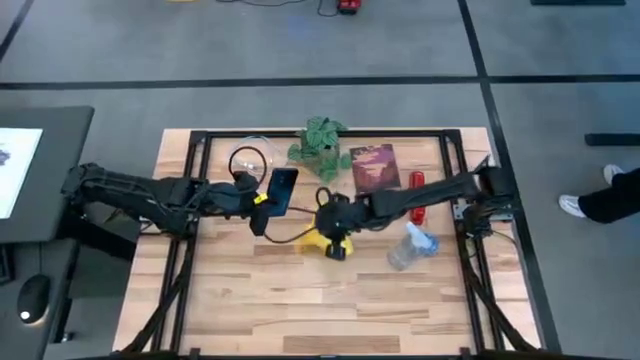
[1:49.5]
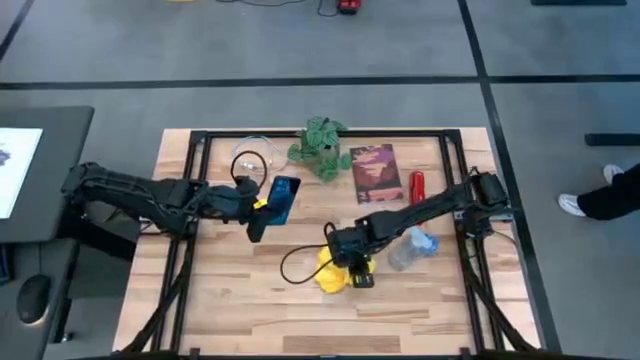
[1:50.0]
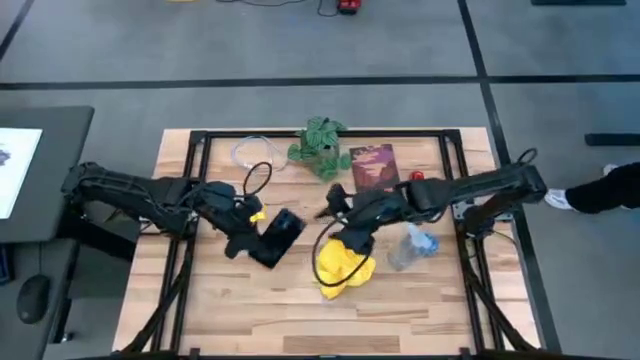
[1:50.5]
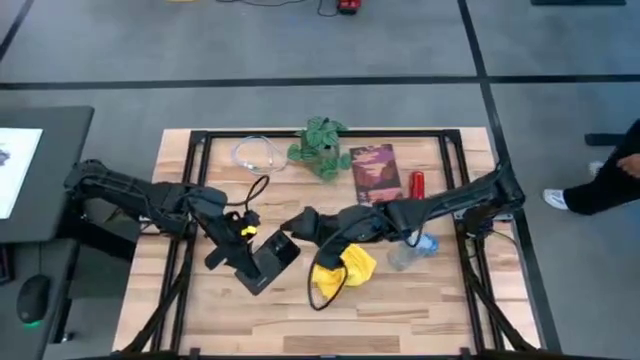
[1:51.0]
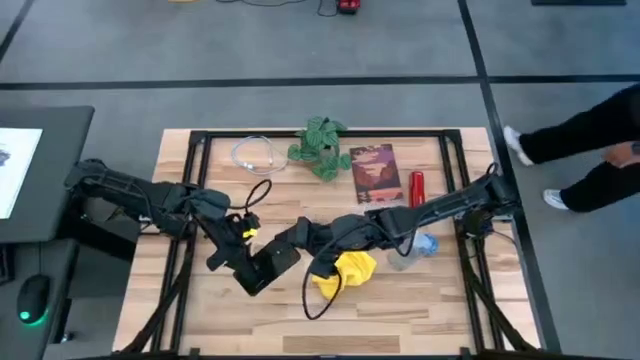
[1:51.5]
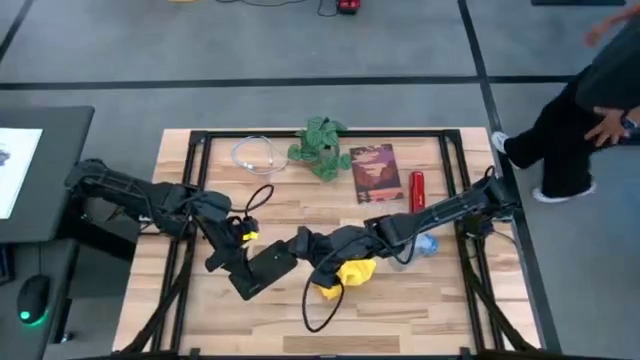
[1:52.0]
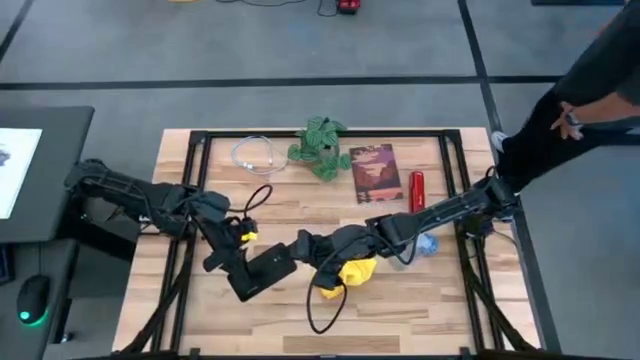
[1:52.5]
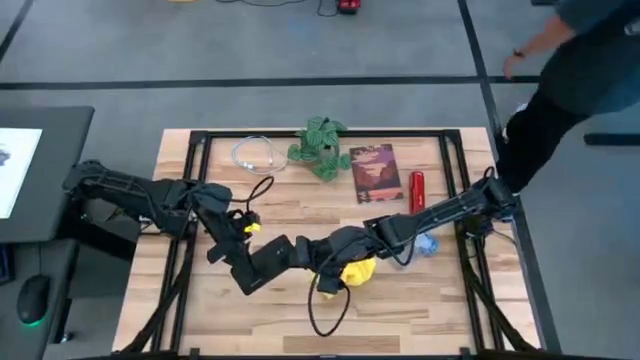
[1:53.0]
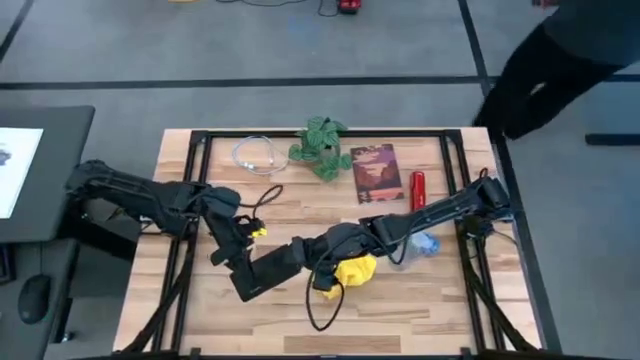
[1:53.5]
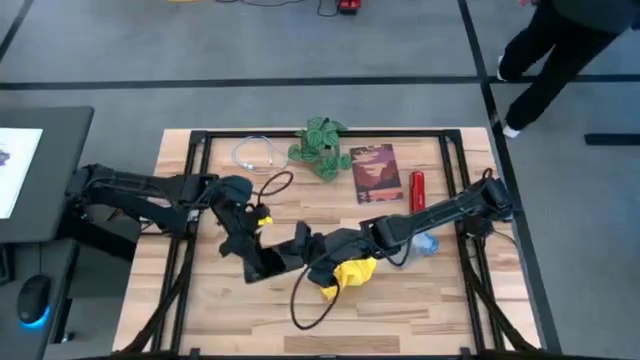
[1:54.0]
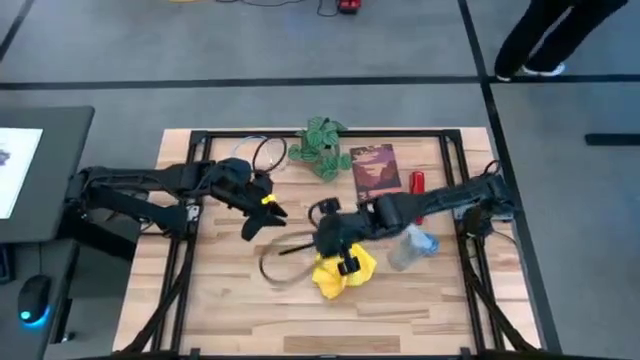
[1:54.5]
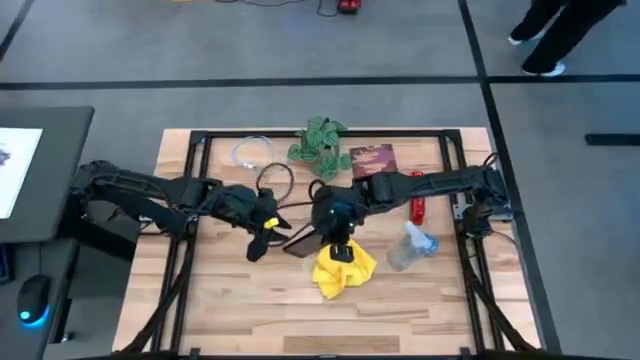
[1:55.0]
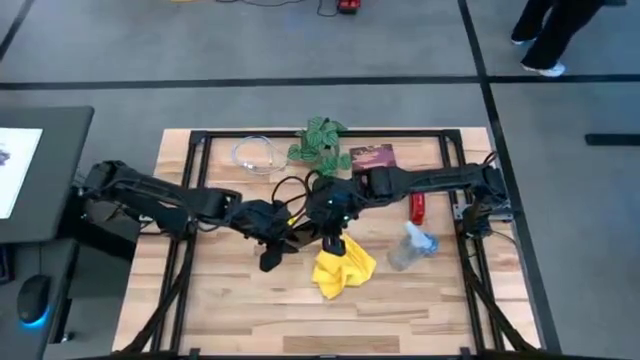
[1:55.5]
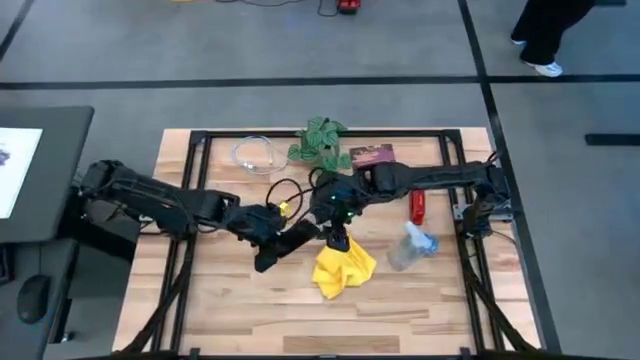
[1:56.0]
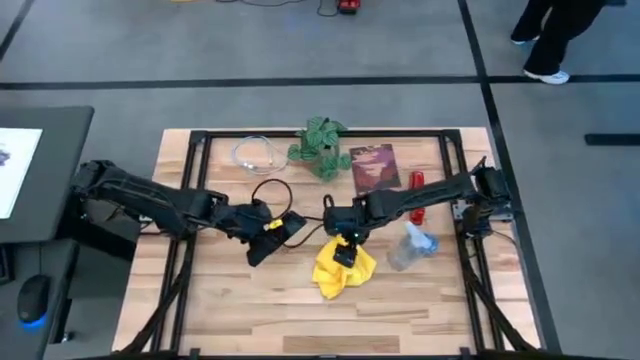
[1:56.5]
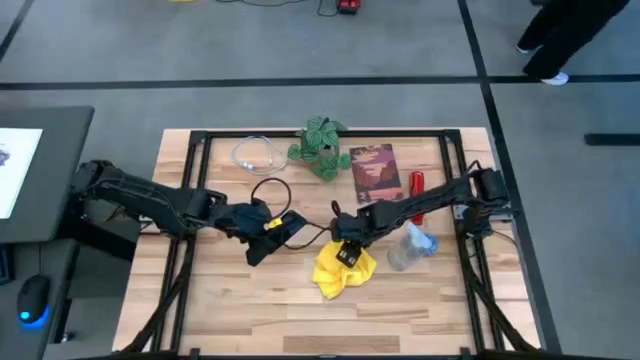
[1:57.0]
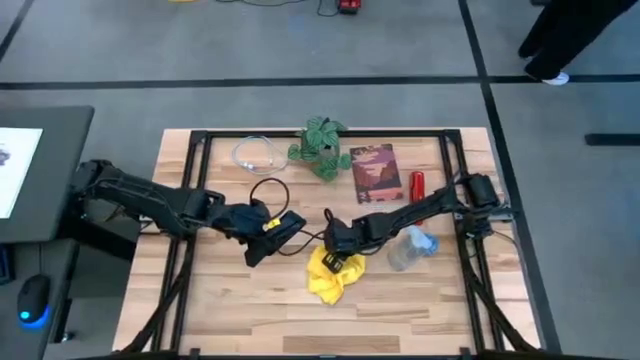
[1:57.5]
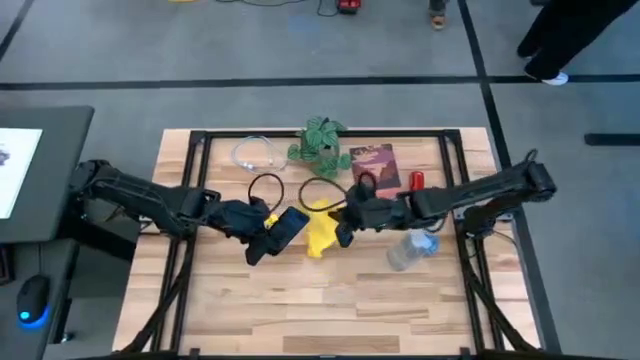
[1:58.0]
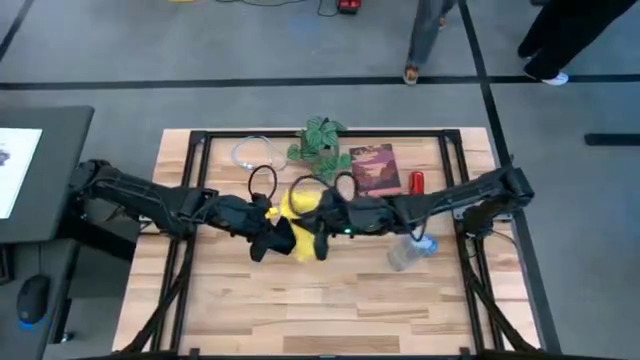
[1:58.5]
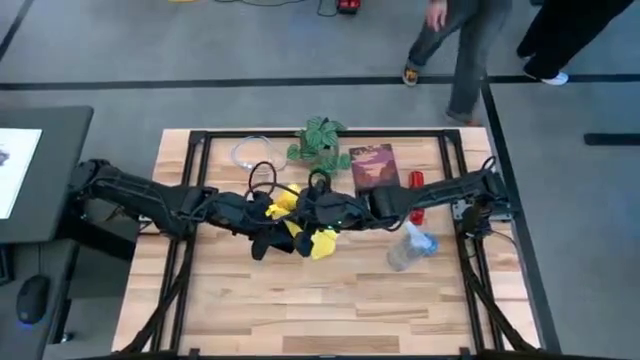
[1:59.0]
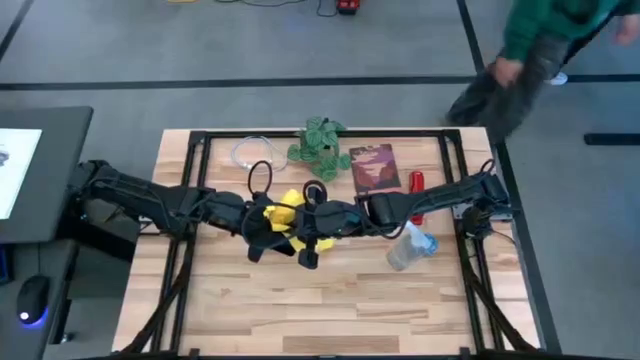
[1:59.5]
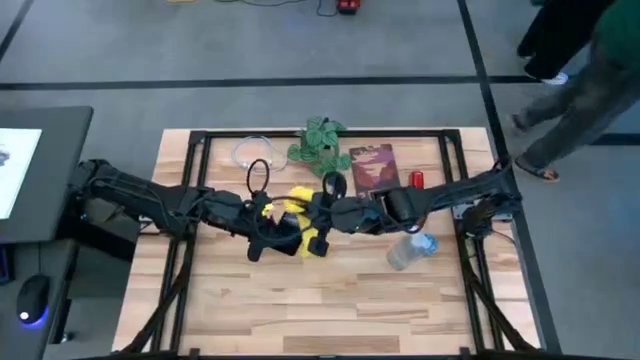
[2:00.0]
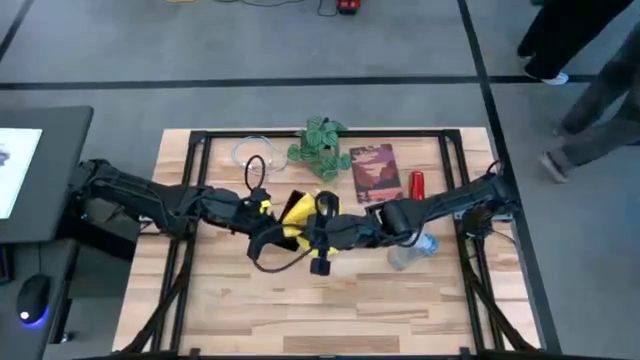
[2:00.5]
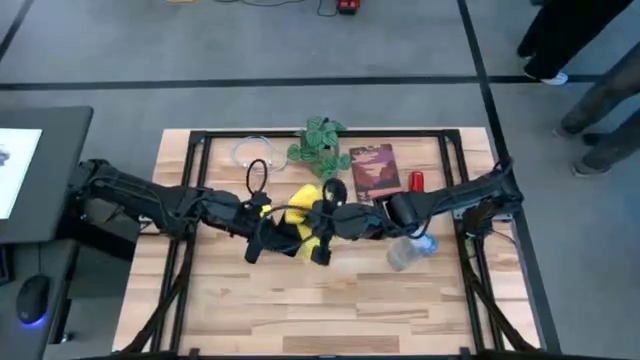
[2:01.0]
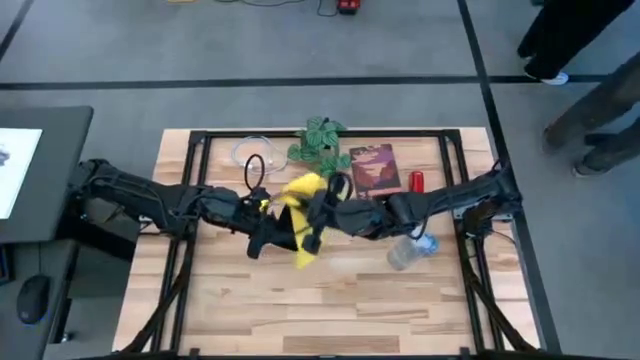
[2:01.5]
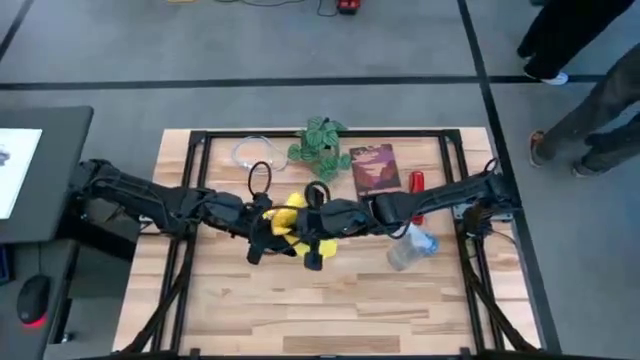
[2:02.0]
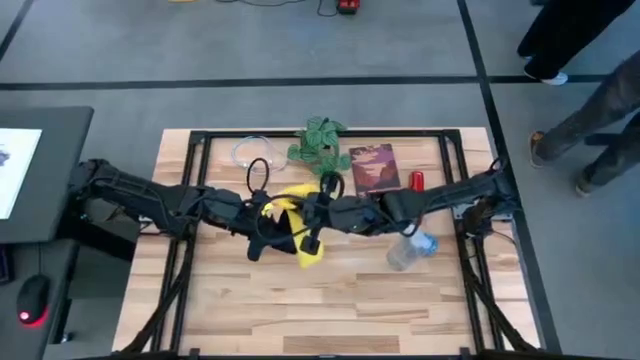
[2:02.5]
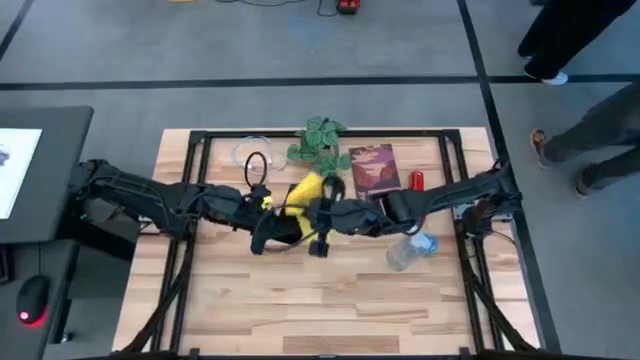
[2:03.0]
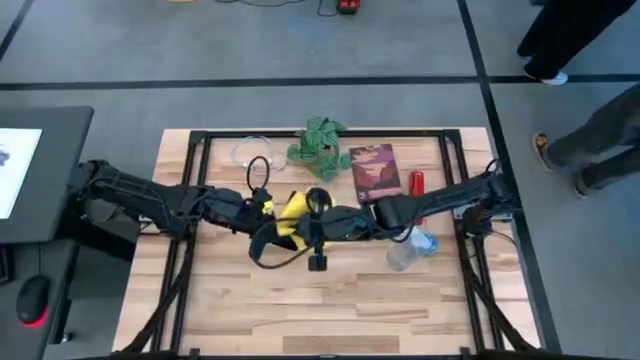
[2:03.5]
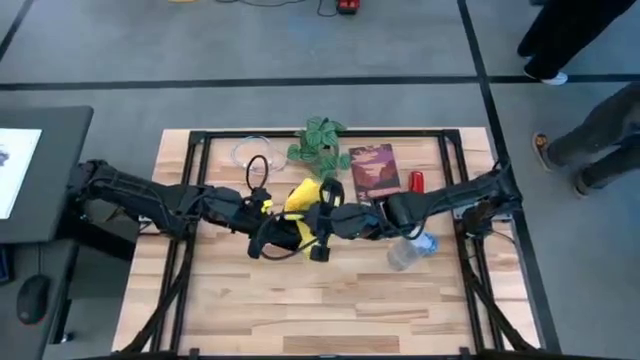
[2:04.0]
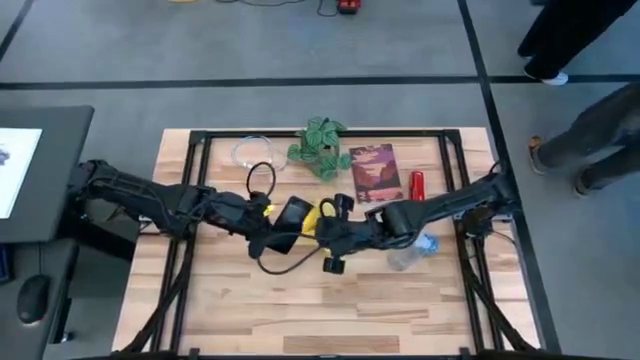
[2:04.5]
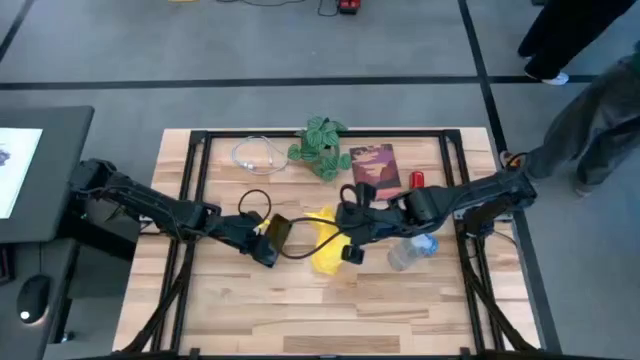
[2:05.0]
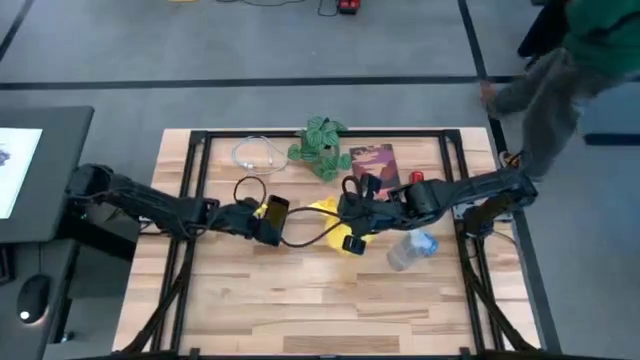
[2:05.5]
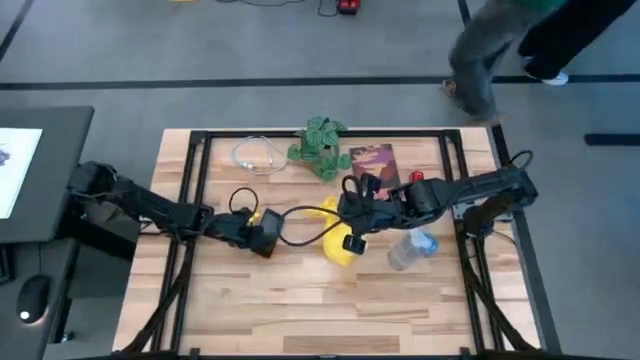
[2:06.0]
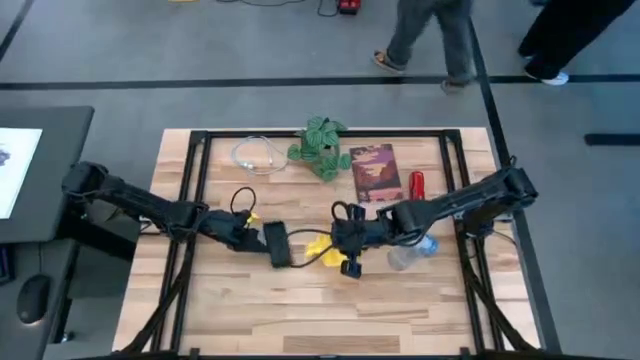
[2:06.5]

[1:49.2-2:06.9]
Task: Apply microfiber cloth
Wipe the back and front of the cellphone with the yellow microfiber cloth

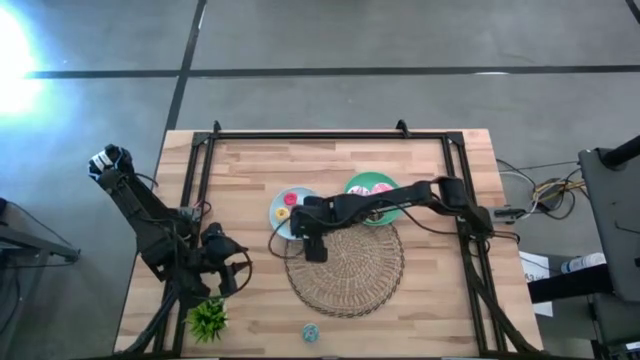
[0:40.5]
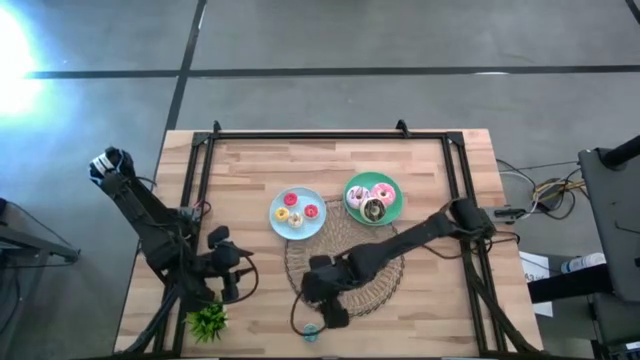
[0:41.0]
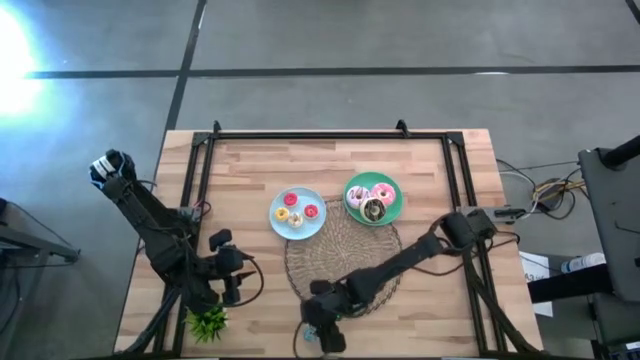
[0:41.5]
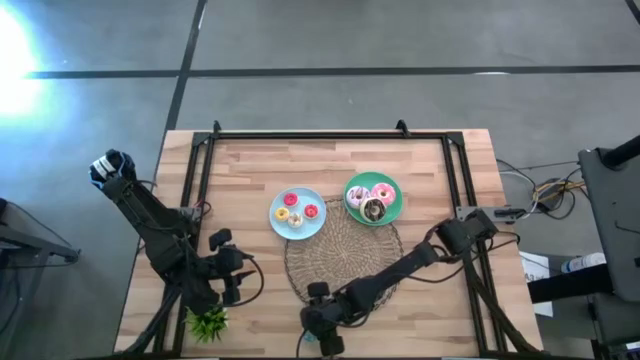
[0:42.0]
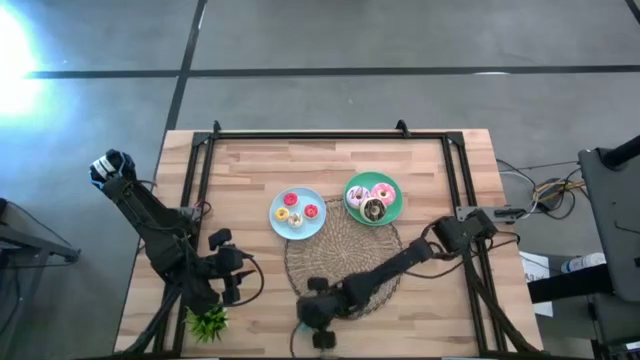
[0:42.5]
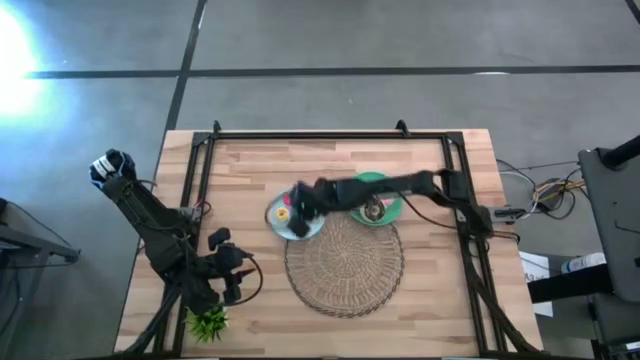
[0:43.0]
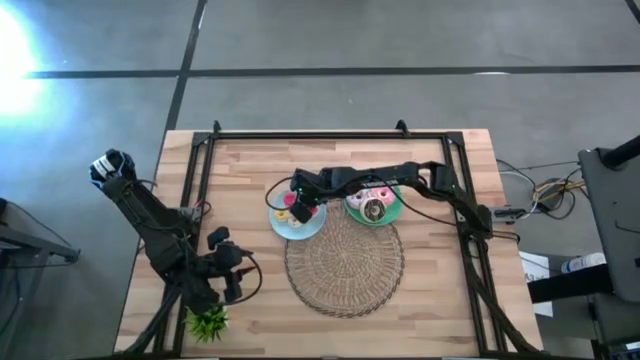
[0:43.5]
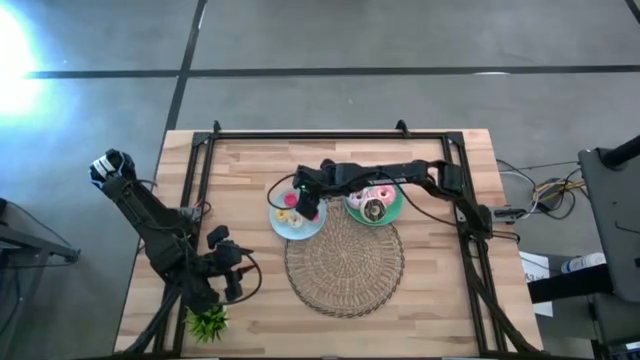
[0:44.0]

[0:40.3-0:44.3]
Task: Pick & Place donuts
Put the small blue donut on the blue plate
